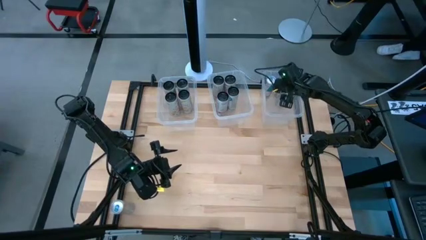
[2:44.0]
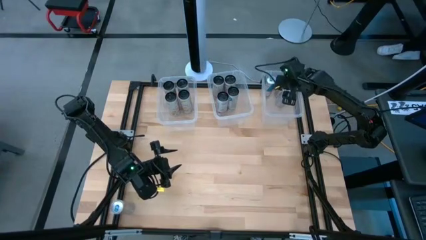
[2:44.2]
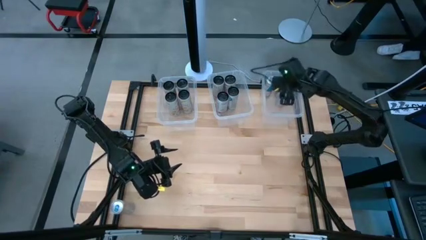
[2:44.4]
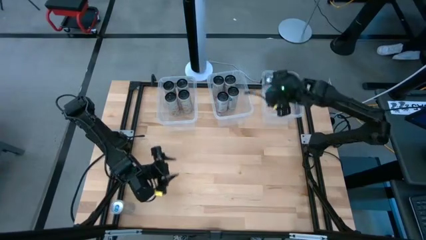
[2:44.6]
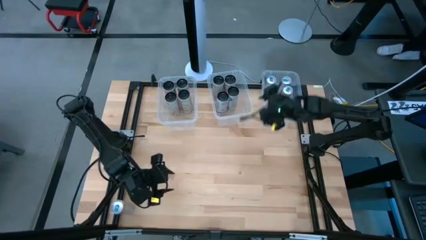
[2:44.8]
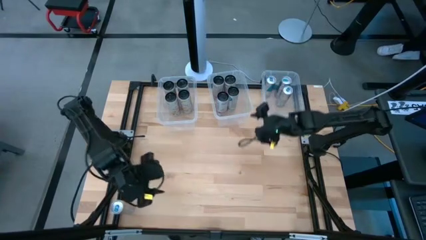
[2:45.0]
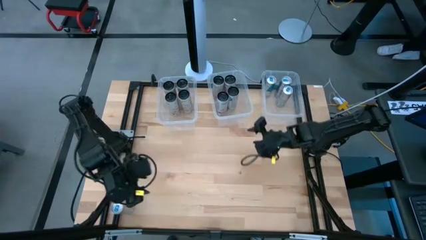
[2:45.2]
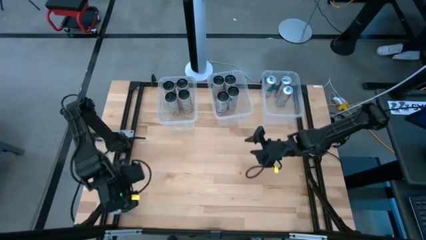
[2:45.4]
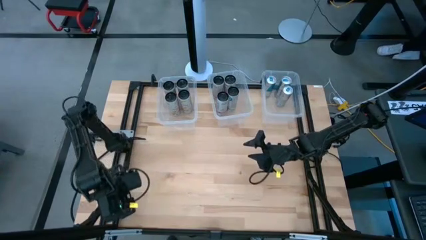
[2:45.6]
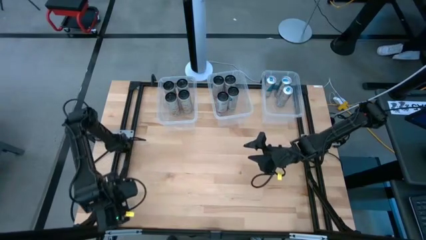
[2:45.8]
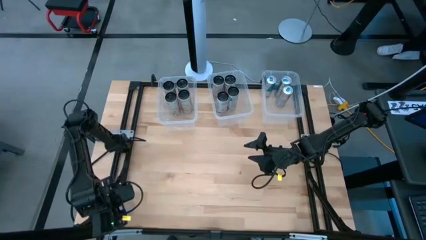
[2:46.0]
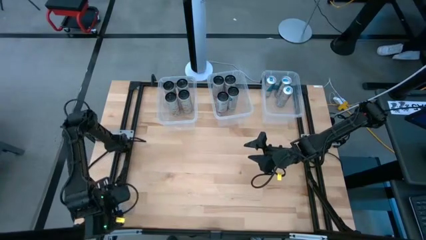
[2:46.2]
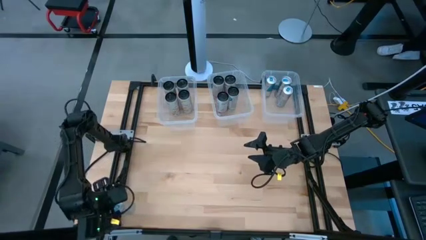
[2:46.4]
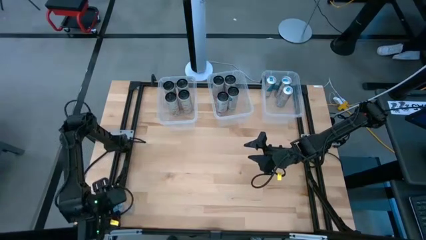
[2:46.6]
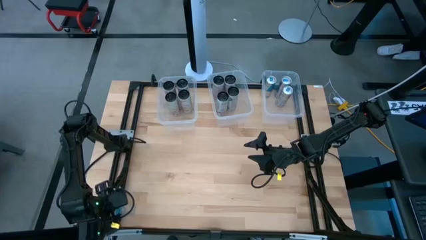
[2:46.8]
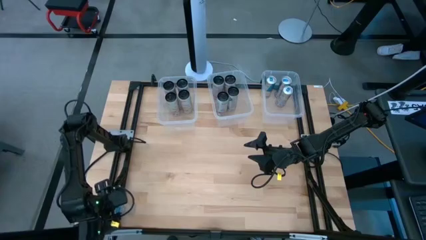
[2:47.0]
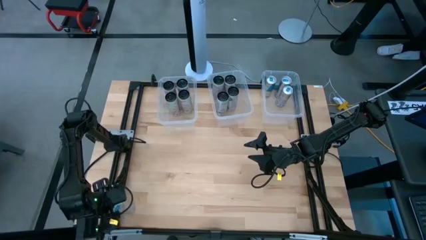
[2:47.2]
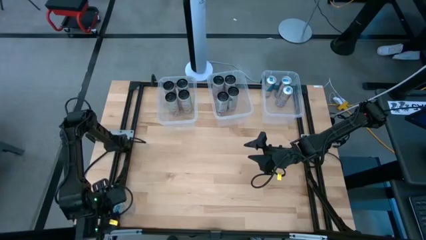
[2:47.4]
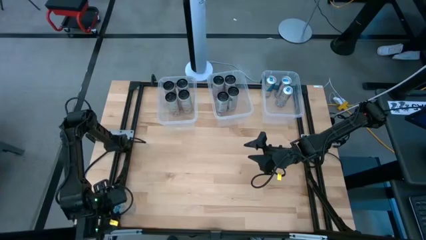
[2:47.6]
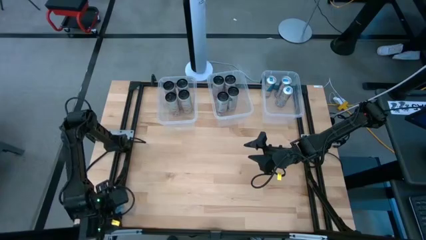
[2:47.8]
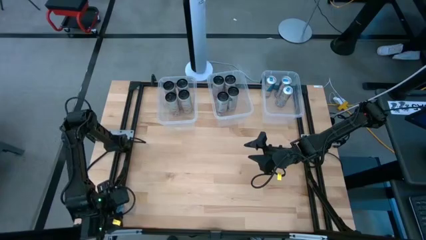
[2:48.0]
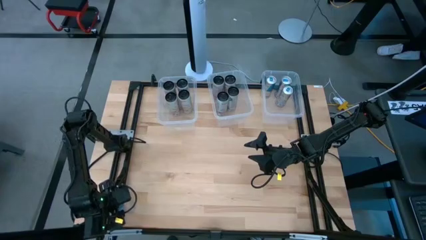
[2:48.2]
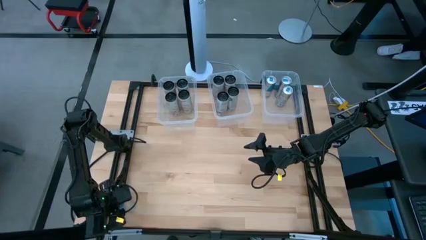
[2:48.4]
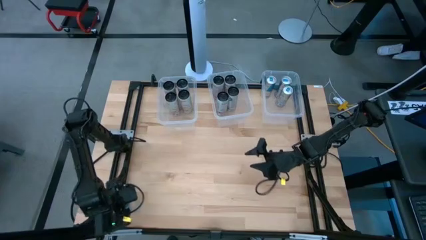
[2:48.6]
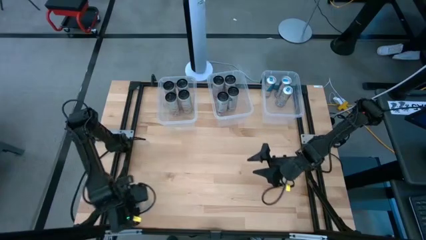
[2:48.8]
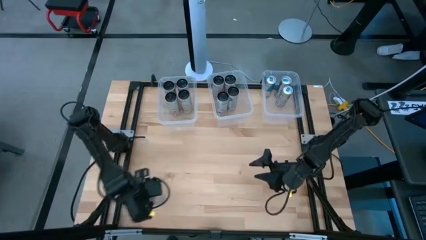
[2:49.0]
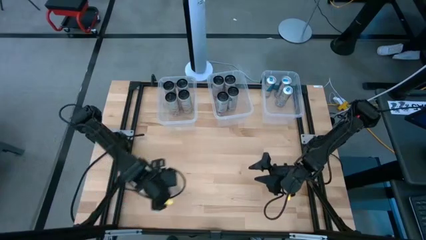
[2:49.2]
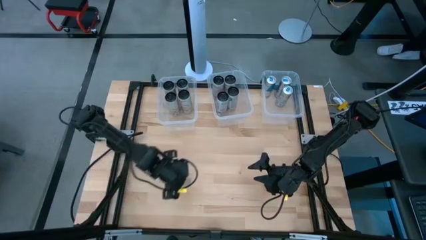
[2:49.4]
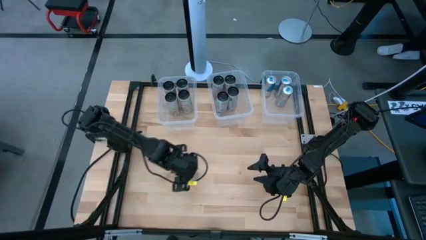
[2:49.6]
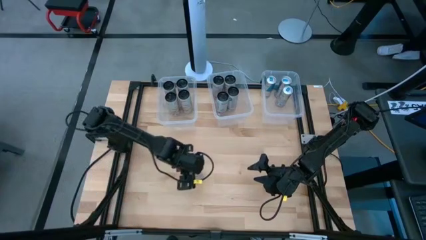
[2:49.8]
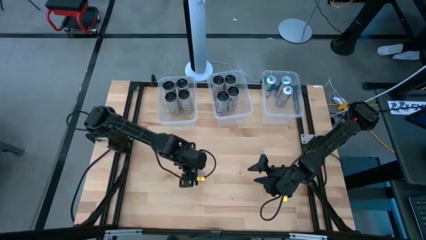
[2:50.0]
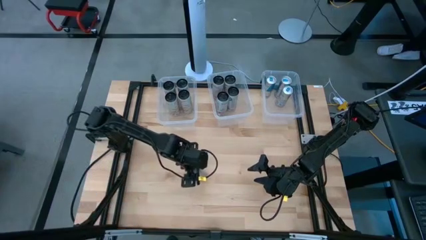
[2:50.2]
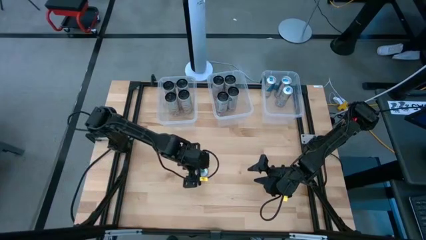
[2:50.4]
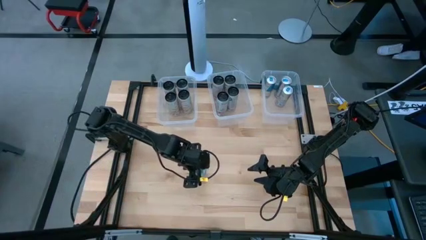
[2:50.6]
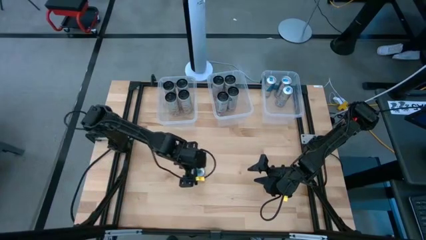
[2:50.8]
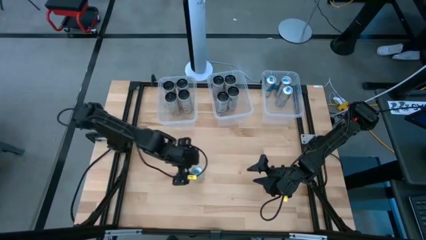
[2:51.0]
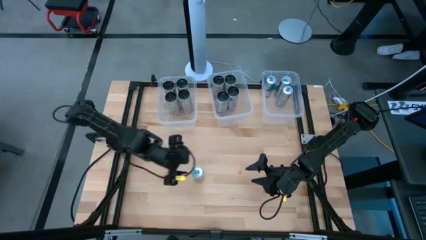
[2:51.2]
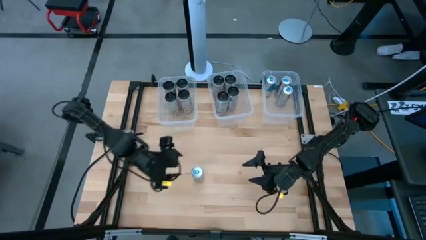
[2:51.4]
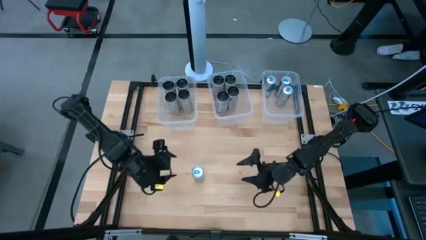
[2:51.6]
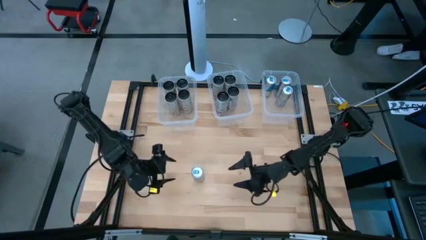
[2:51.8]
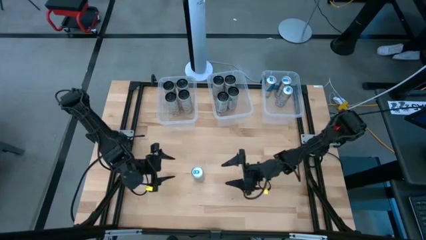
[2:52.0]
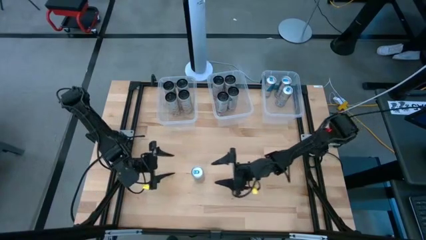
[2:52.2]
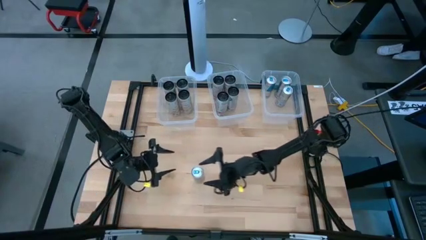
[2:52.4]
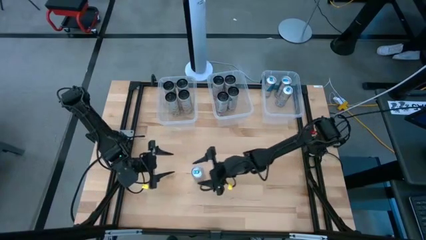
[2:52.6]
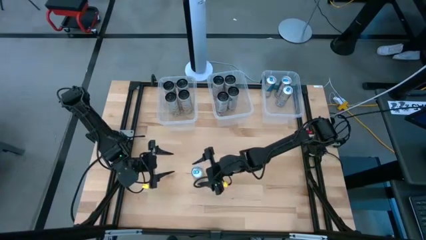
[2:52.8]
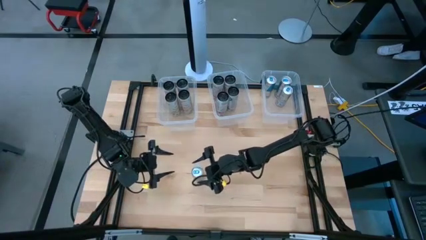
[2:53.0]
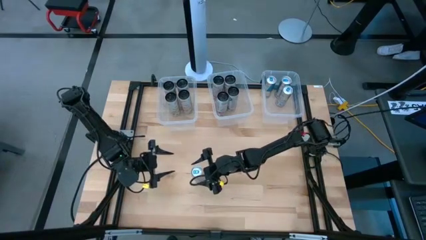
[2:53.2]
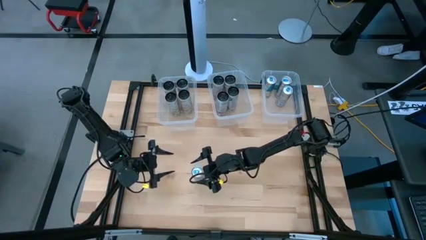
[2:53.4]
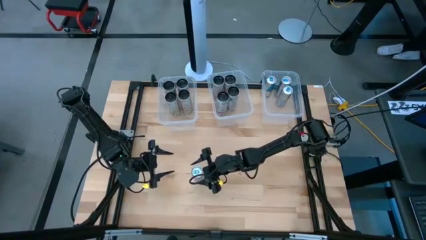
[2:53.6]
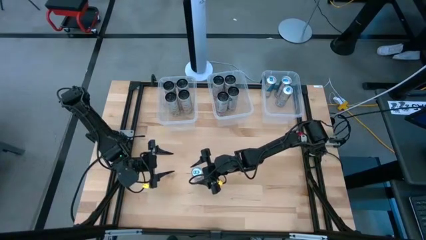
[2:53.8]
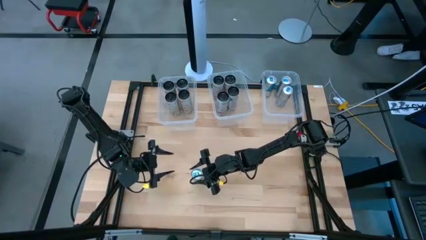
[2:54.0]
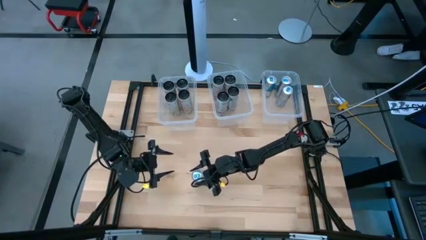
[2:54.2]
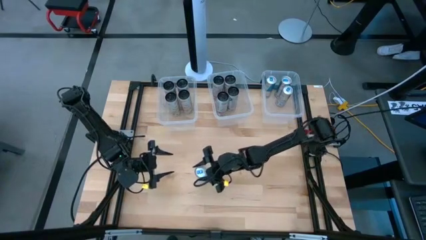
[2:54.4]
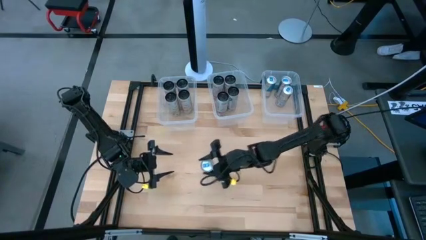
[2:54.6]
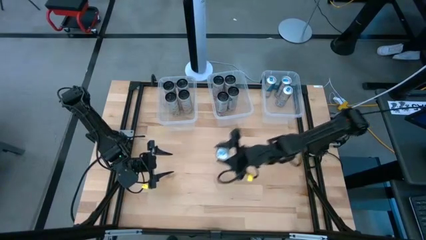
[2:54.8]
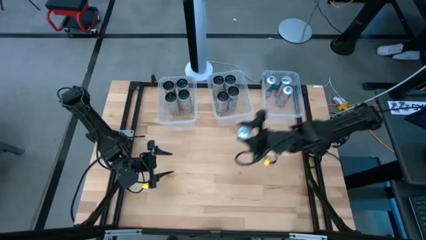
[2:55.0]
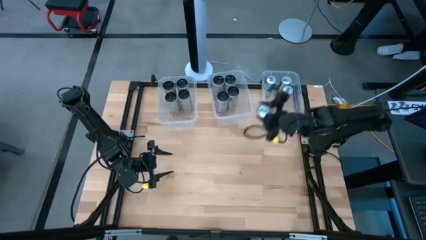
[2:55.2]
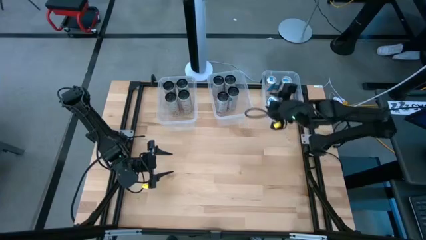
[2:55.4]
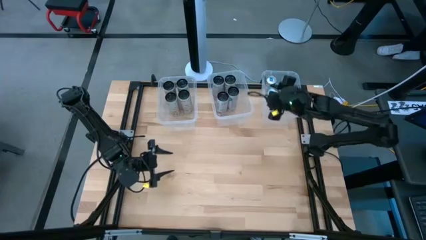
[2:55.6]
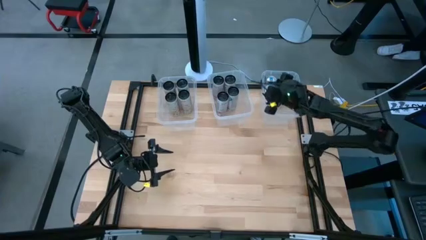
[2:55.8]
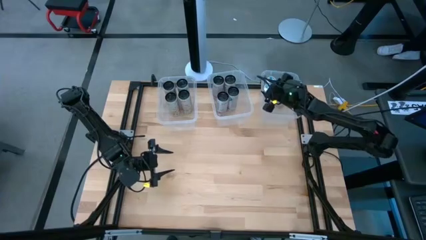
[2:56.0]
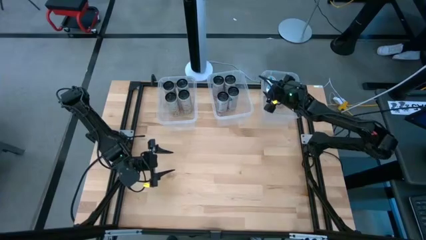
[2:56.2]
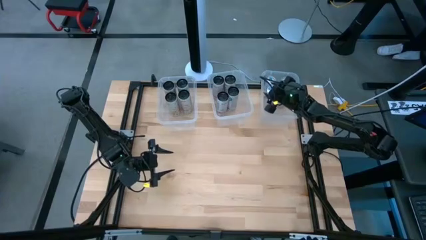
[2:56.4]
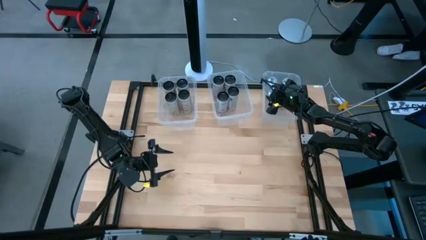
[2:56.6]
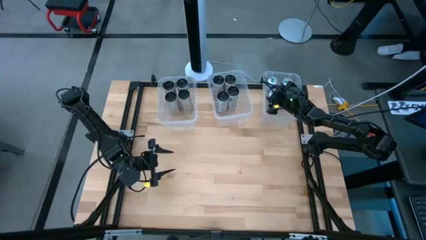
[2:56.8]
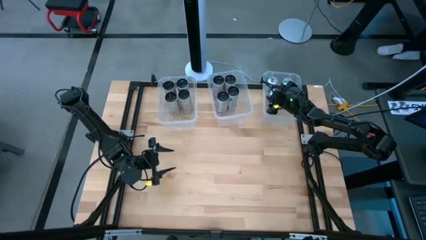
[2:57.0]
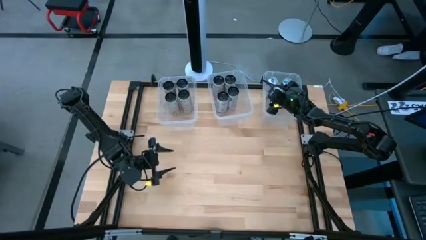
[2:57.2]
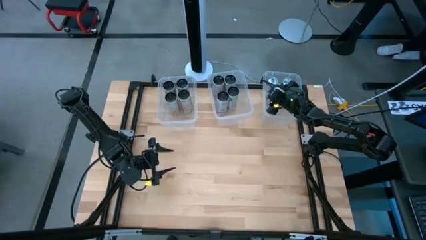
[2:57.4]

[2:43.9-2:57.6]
Task: Sort soda cans
Put the white and blue soda can into the right transparent bin

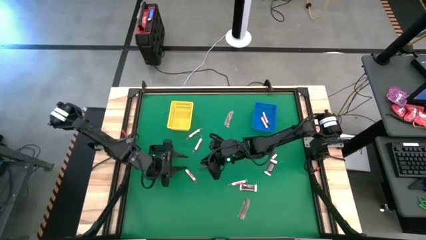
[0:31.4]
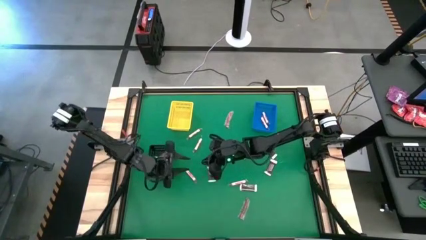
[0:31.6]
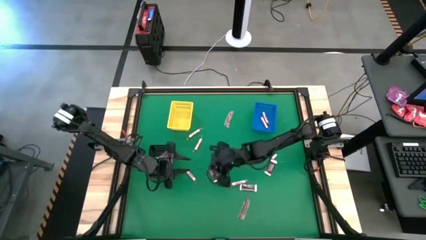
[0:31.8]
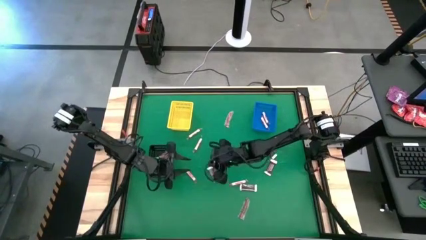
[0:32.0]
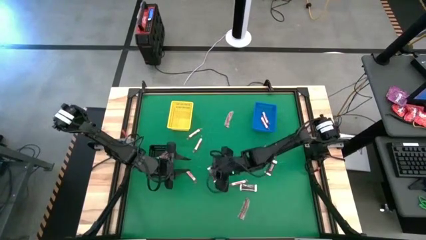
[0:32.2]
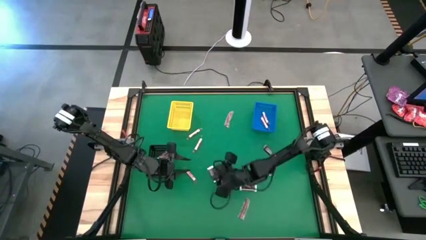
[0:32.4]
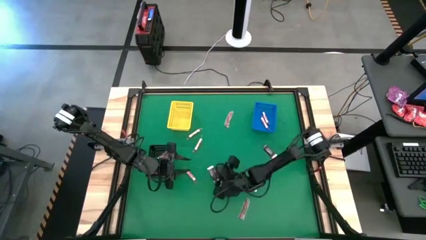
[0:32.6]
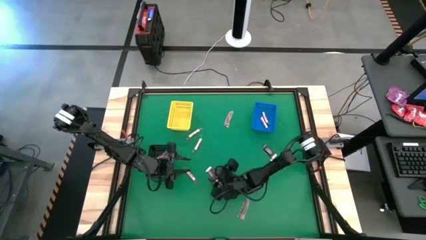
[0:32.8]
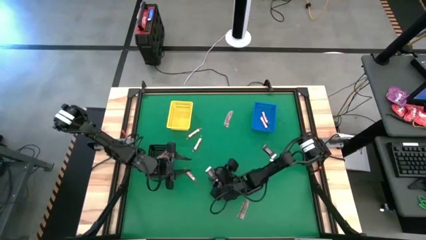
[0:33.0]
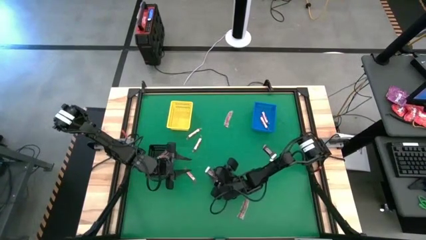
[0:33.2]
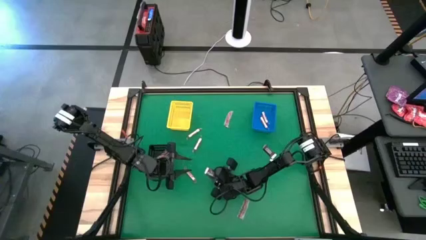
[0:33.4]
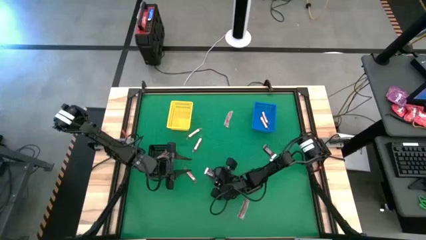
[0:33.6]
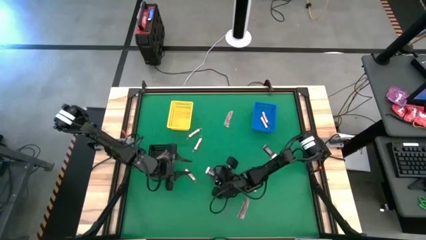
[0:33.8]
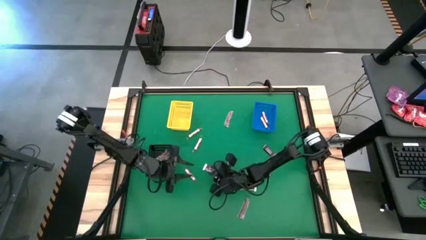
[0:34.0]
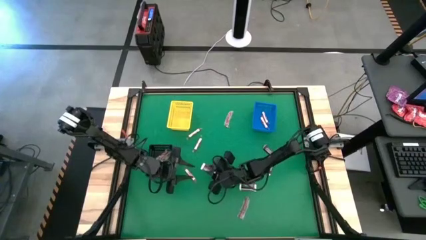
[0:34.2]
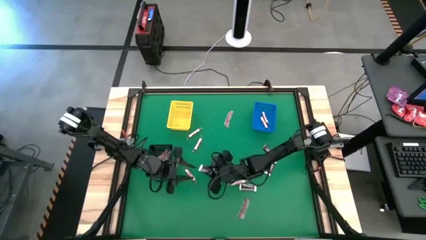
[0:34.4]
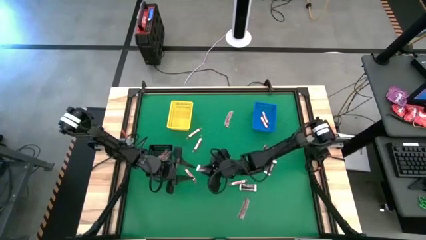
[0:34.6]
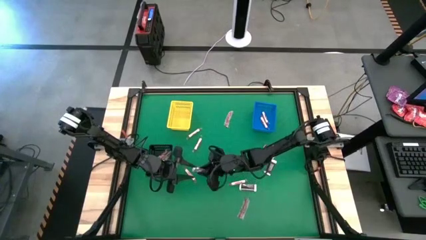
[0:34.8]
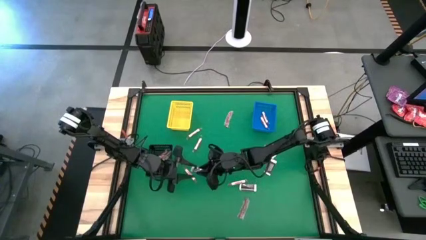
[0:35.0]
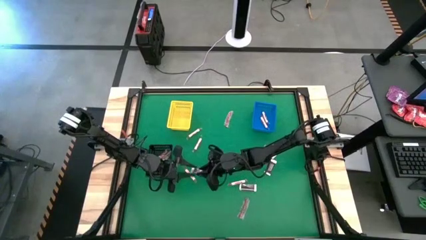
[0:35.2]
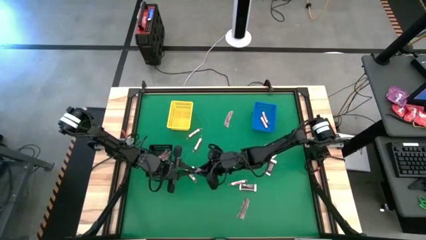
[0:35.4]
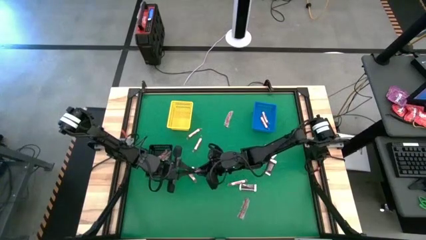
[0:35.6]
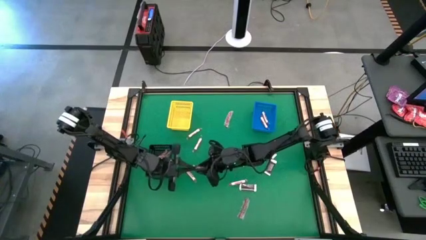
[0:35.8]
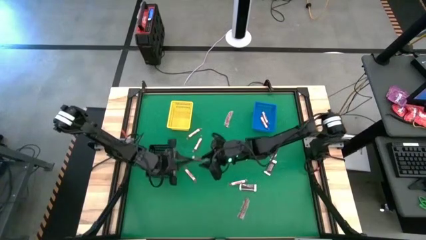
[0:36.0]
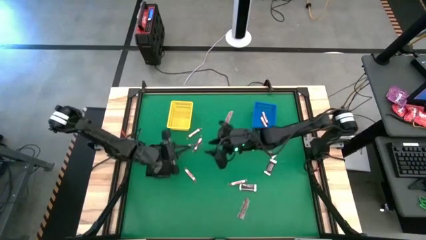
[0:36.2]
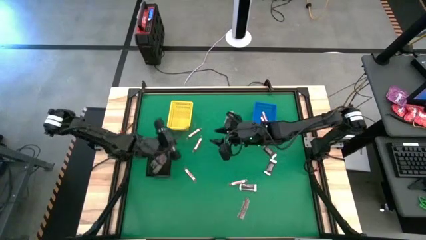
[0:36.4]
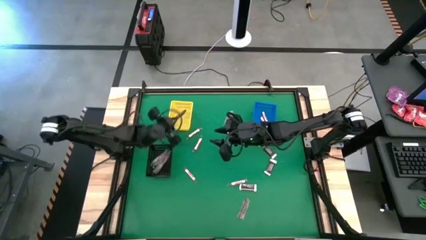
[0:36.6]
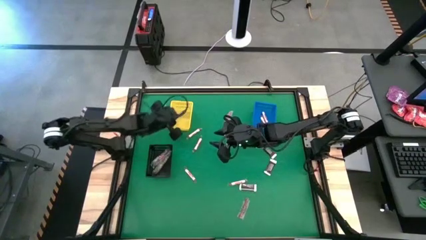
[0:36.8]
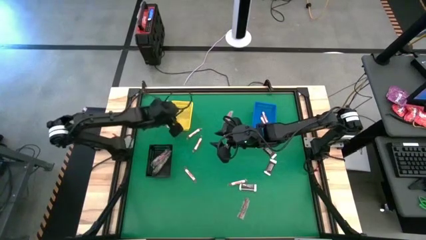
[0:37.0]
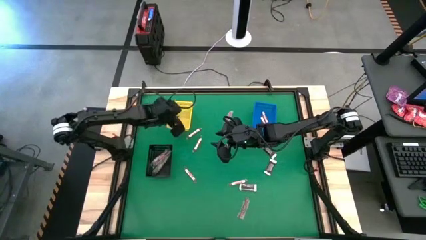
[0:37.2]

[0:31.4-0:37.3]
Task: Sort candy by brand, put in halloween buckets
Put the brown chocolate into the yellow bin
